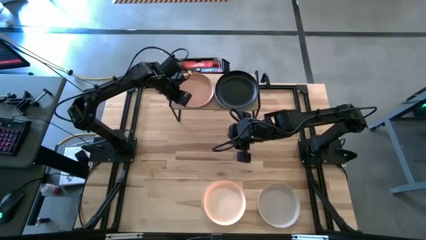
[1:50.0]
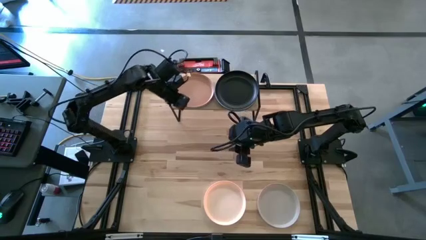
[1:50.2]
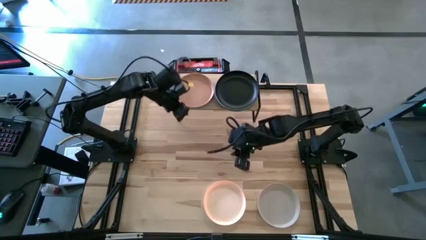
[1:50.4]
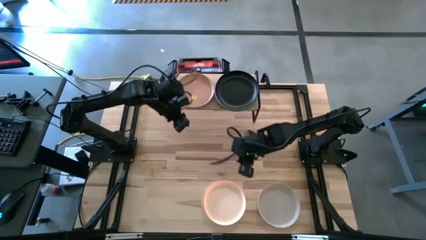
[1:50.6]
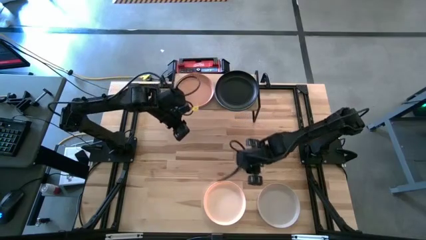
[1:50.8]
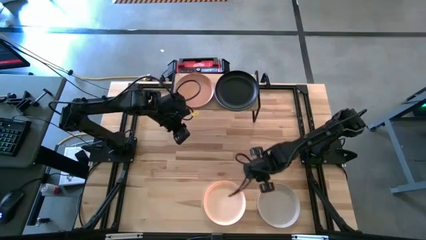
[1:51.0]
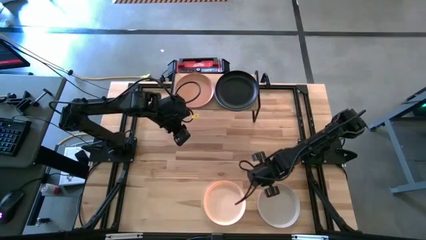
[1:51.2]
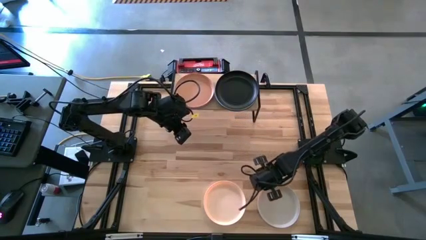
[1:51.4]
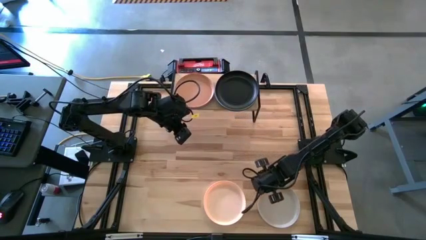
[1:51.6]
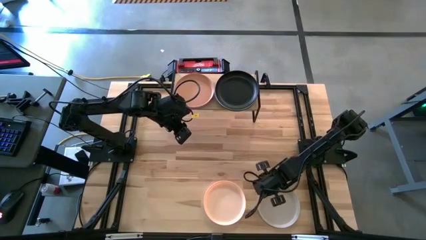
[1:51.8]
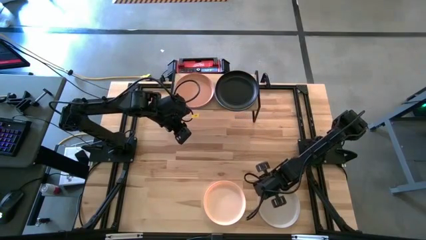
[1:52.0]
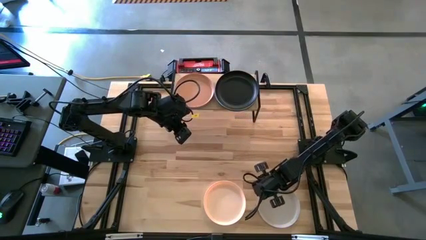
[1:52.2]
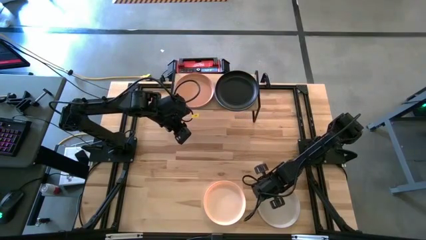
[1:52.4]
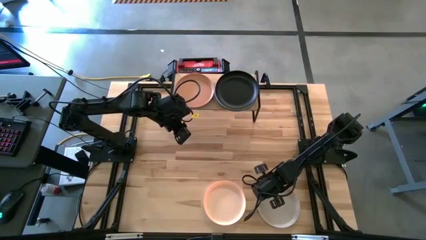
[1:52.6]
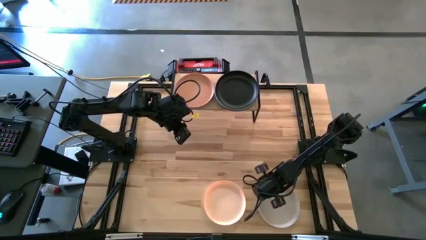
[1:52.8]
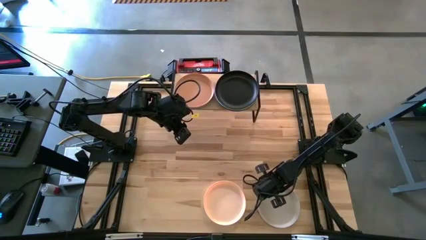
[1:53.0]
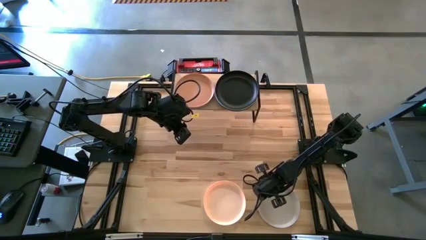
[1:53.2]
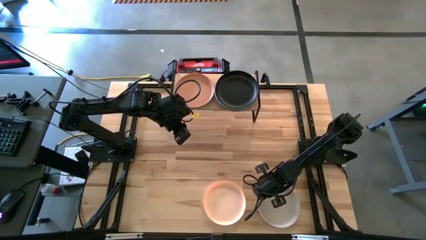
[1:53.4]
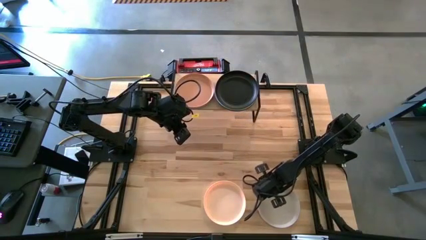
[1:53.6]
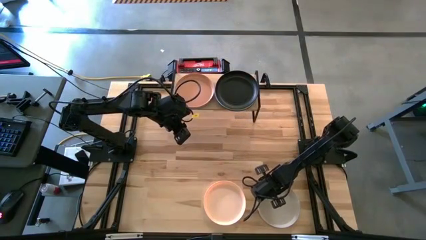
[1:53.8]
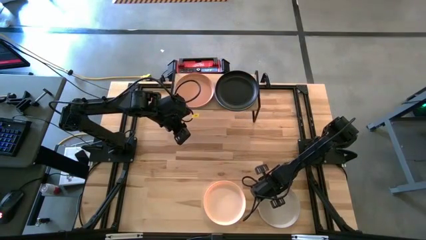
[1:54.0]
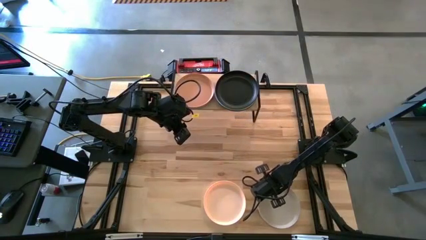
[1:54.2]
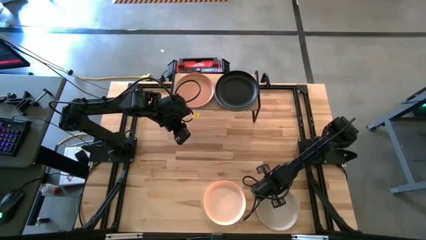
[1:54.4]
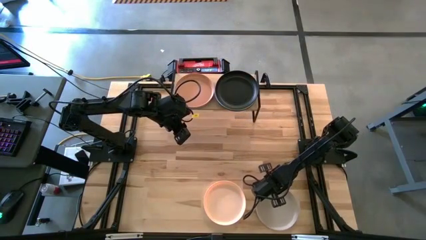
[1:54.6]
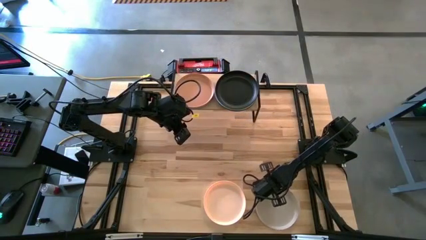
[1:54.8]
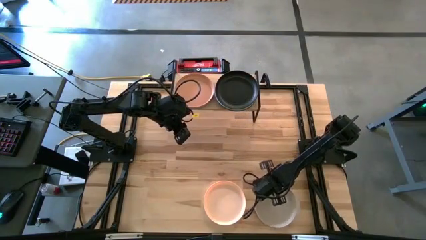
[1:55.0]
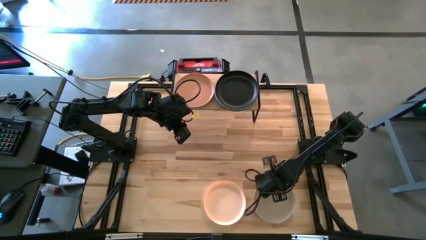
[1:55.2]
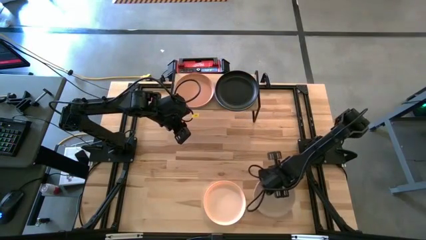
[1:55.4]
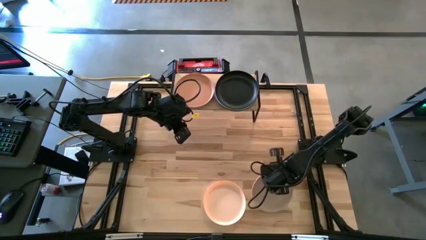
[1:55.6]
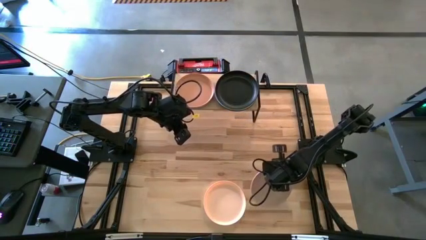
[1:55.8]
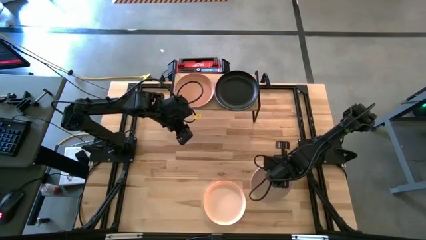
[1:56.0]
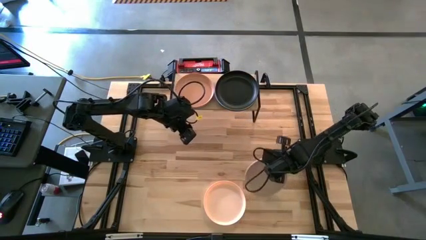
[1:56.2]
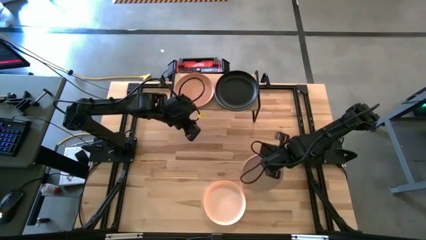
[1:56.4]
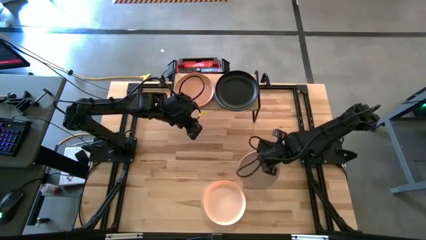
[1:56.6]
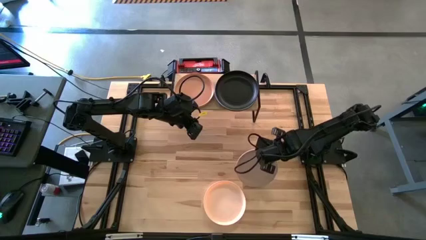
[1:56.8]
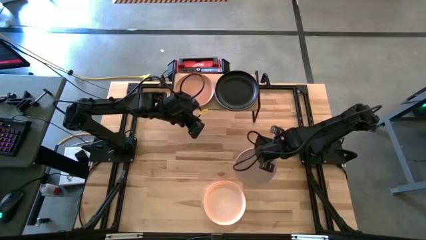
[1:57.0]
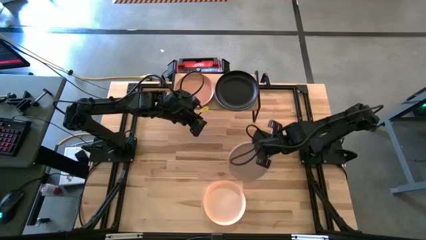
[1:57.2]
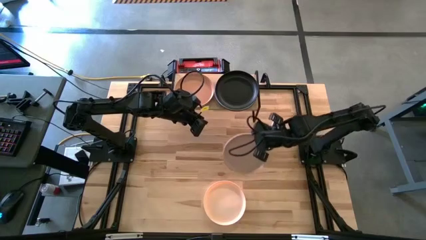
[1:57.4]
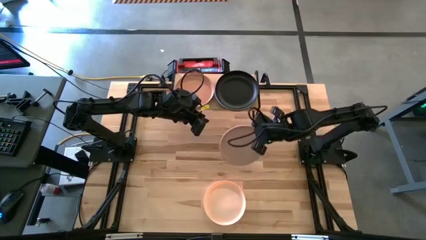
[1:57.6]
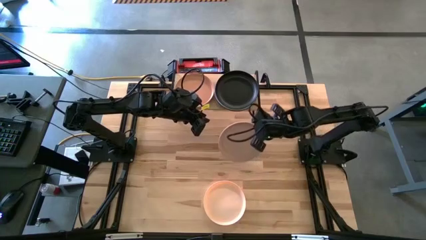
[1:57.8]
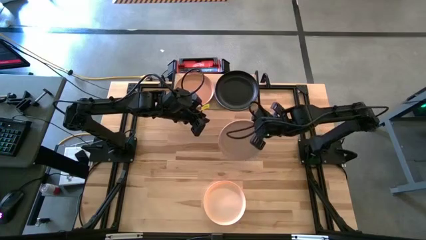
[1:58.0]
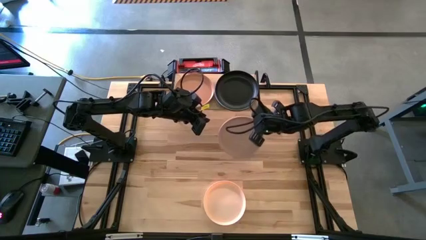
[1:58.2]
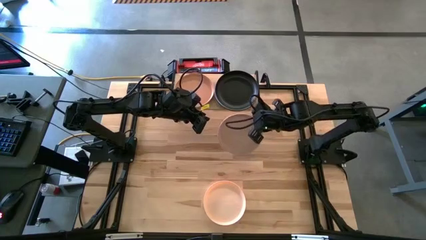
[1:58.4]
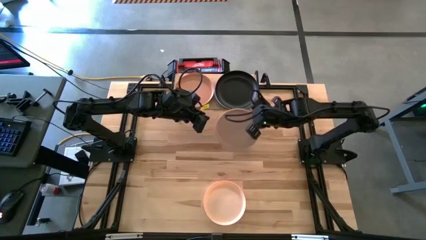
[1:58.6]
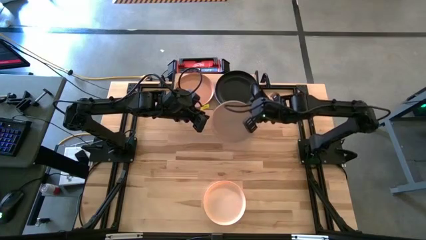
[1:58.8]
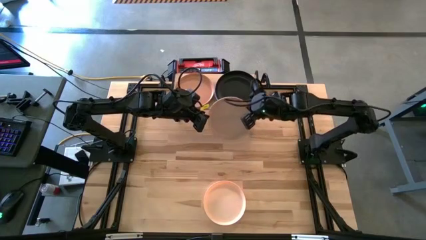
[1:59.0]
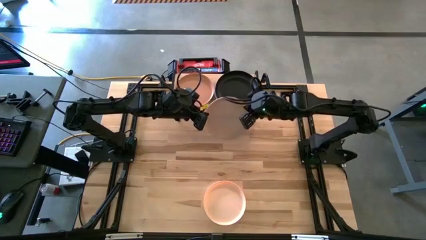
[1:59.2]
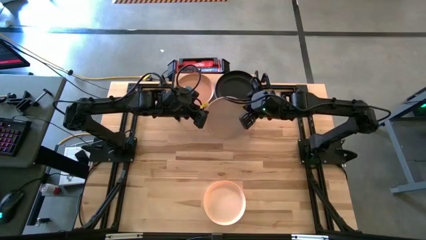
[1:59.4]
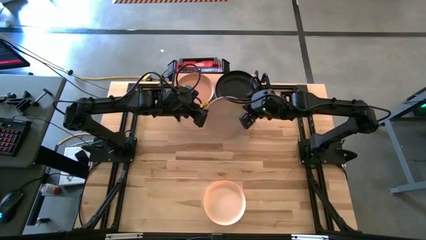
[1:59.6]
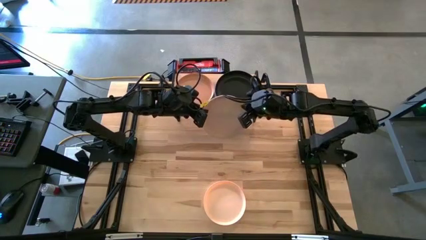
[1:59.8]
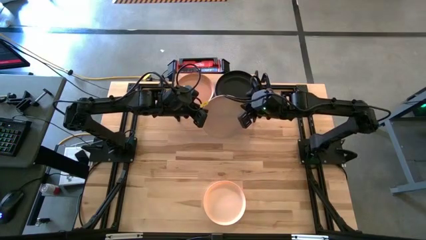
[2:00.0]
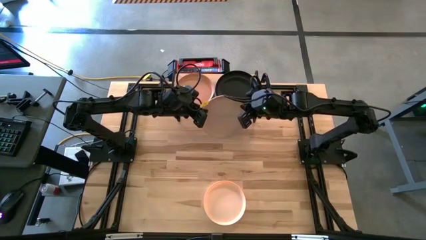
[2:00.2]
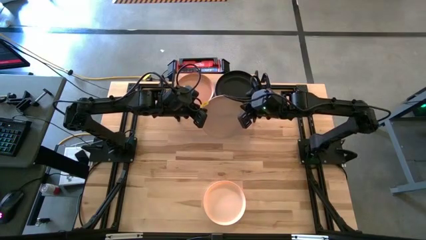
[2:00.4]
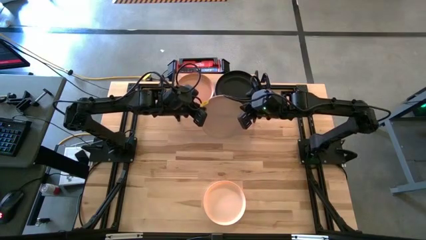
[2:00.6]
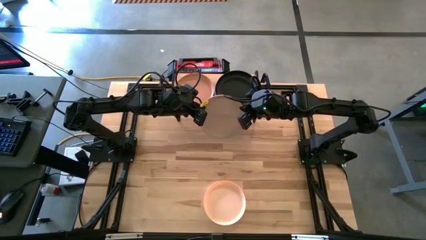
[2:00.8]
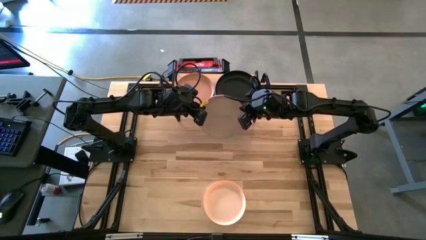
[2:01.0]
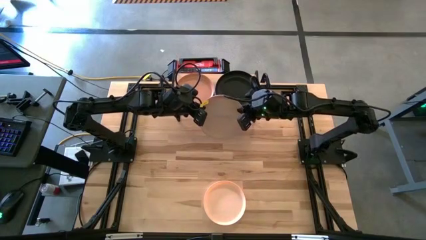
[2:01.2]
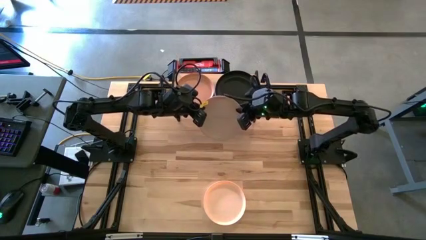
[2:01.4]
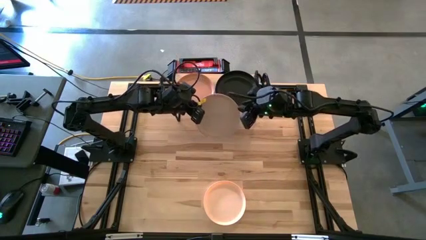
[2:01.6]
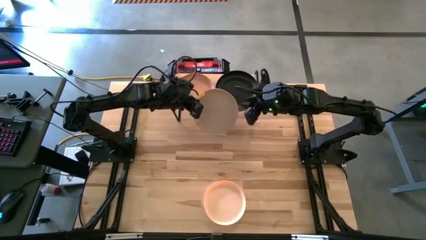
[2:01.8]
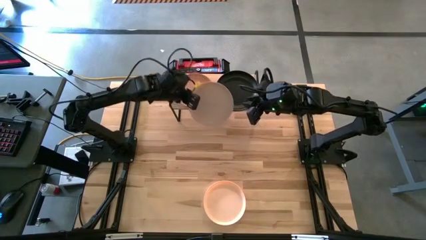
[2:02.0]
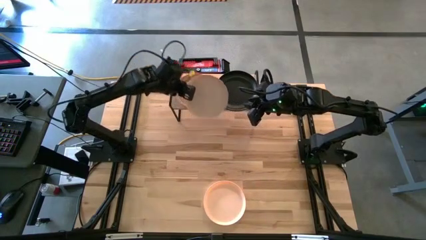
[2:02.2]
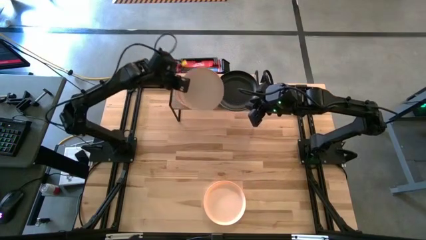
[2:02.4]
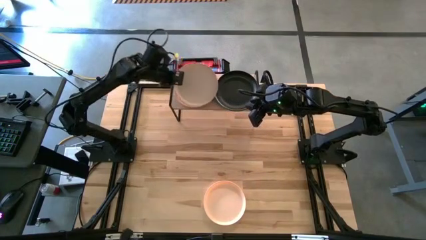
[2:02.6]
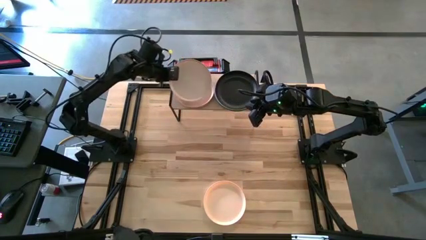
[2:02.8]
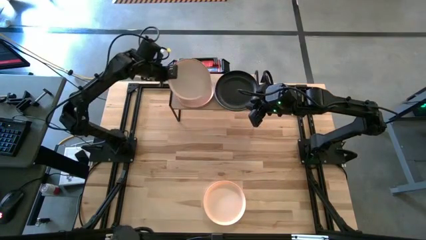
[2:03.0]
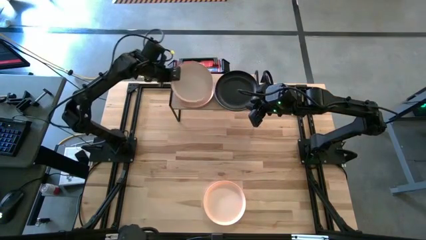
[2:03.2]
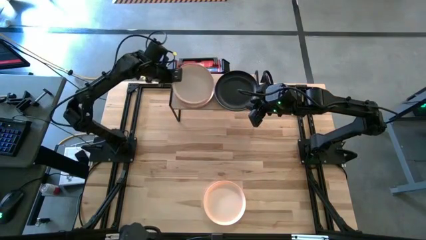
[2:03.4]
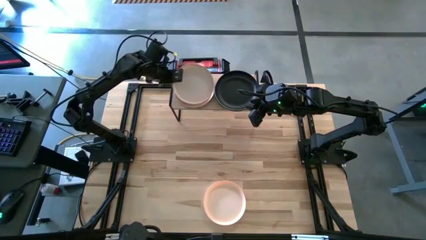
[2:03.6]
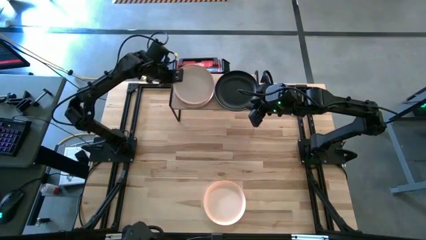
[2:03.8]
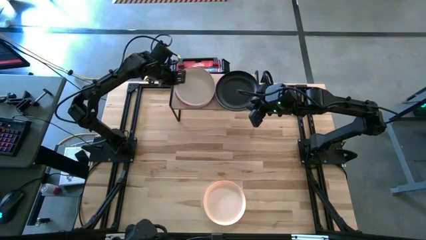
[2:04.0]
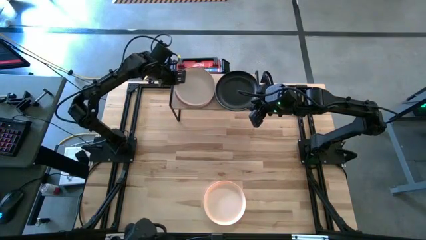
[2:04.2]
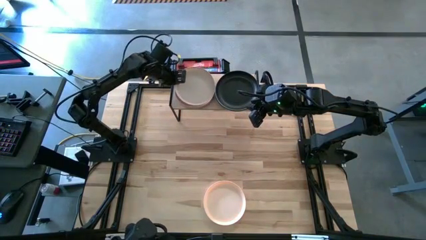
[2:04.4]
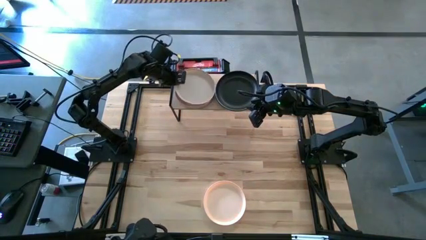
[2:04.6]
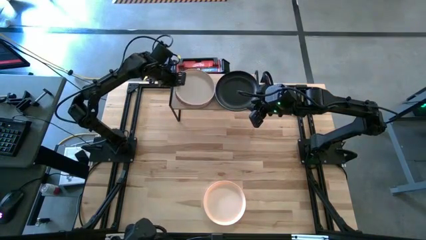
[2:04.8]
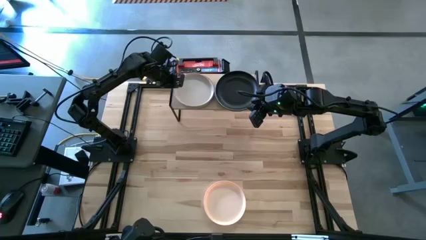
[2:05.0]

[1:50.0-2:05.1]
Task: Place and stack plates onto a shelf
Stack the white plate on the top of the orange plate on the shelf
